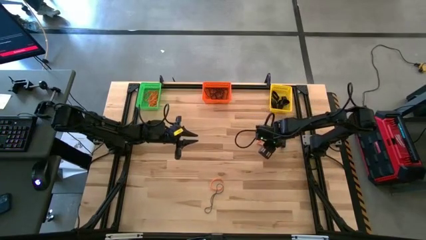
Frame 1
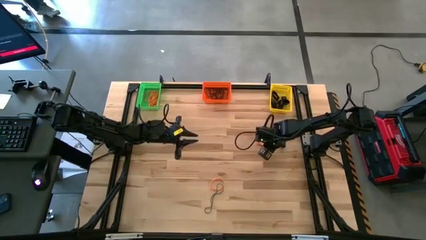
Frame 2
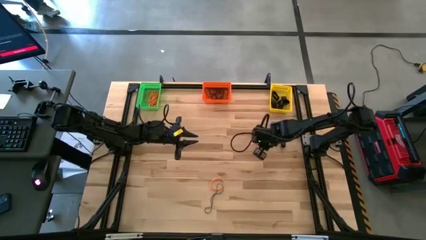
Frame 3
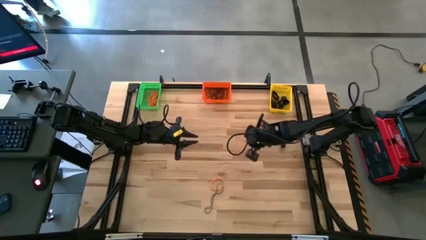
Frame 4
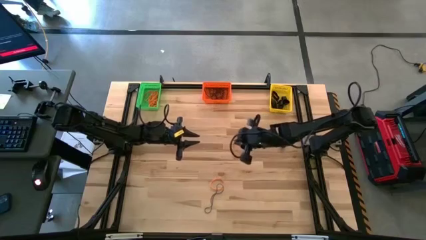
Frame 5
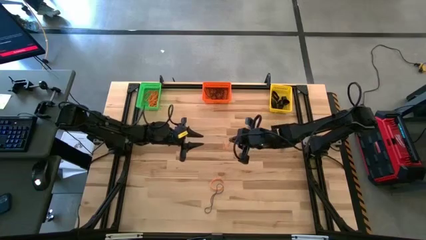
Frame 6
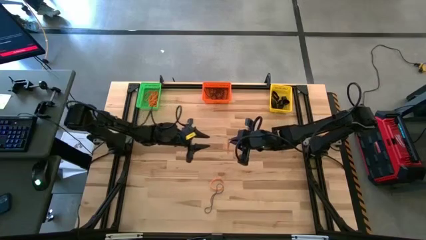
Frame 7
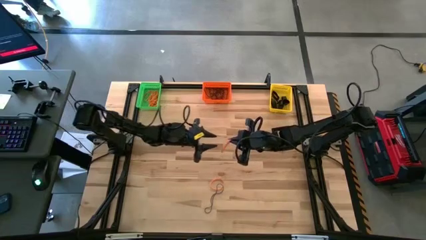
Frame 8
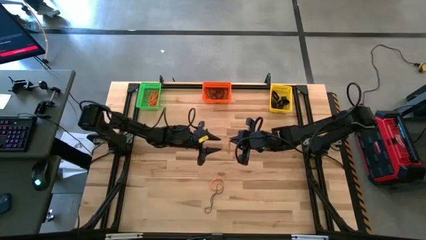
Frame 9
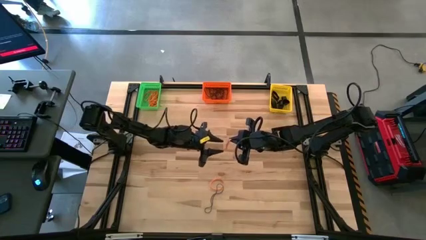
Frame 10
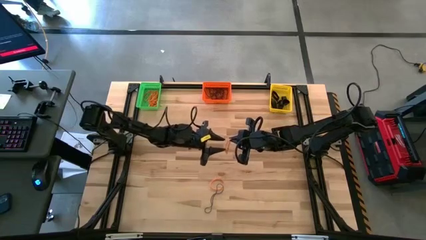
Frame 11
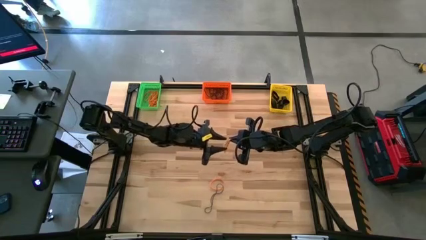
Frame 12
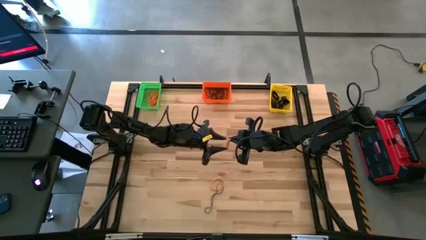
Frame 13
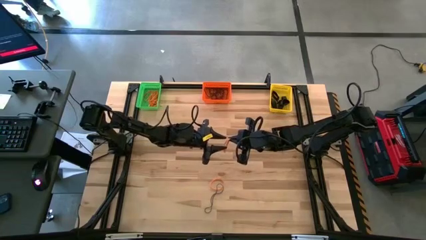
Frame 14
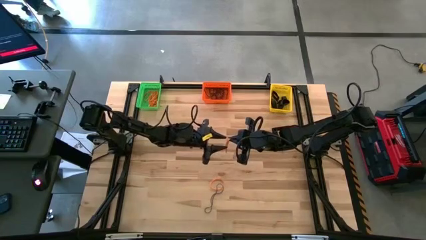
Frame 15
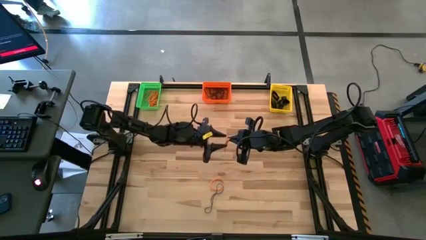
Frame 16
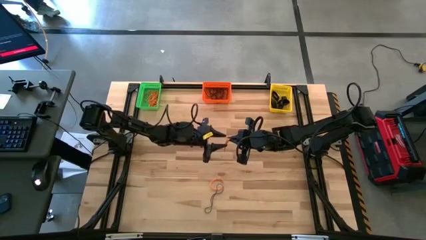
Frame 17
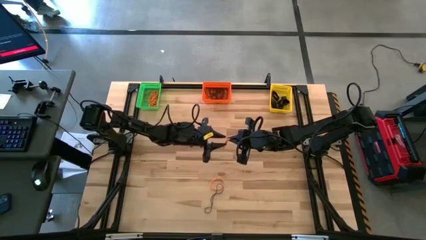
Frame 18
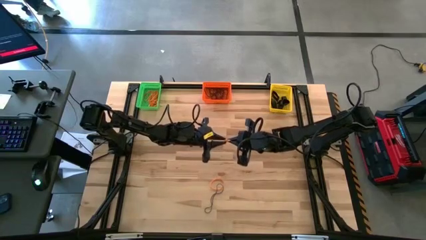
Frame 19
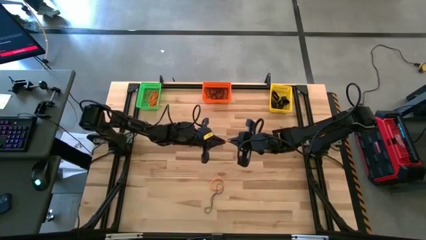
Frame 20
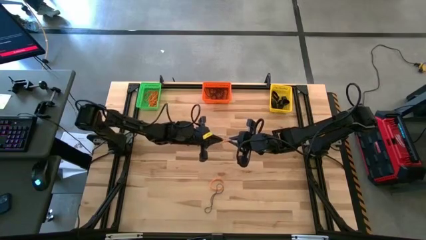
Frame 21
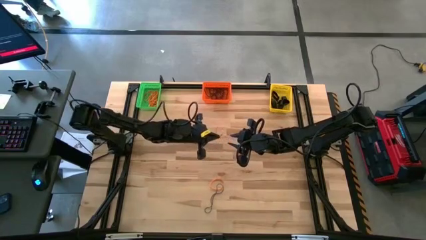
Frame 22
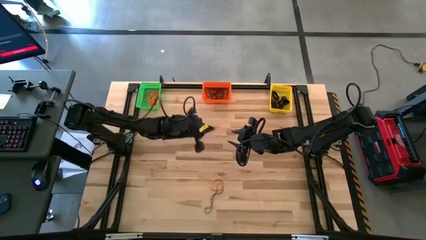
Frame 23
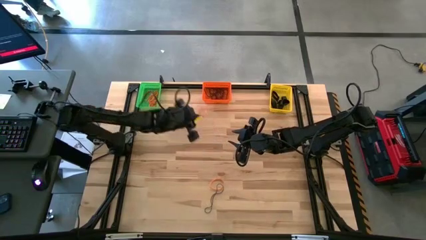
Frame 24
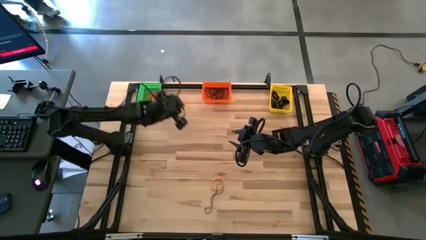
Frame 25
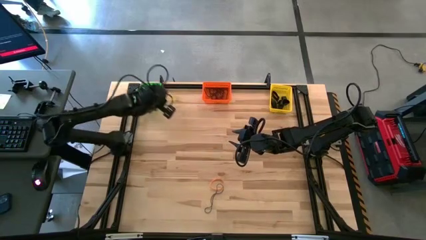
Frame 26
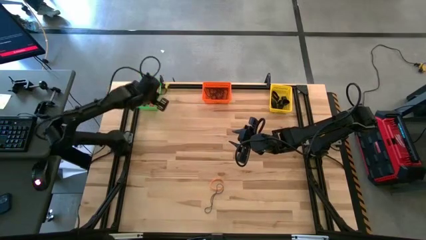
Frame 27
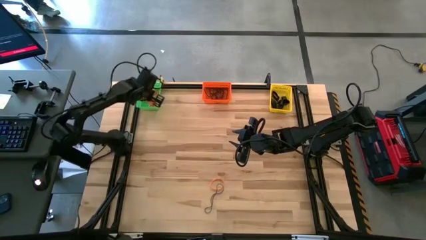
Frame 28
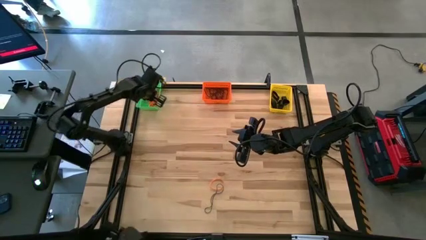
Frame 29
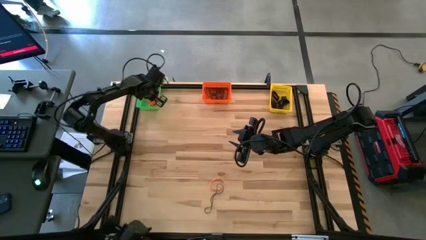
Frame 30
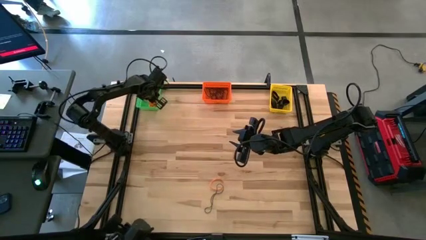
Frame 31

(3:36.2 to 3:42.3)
Task: Sort rubber bands into baskets
Put the top orange rubber band into the green bin

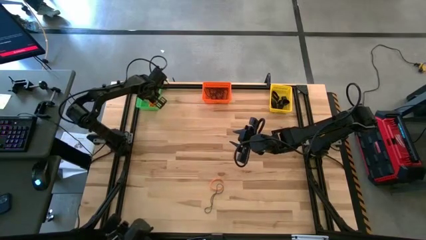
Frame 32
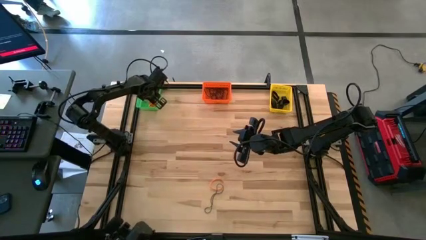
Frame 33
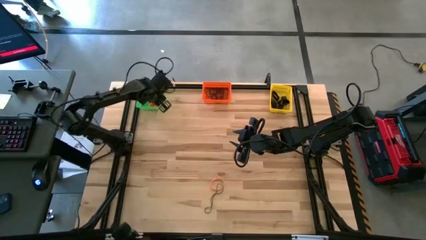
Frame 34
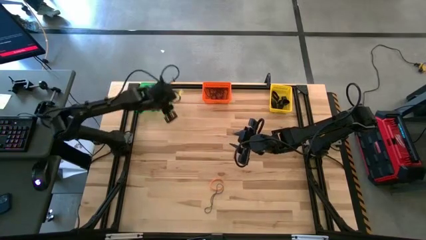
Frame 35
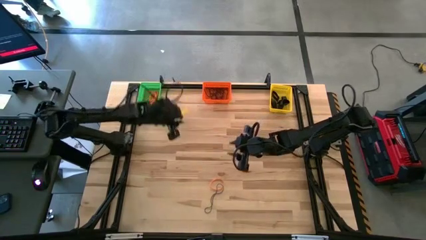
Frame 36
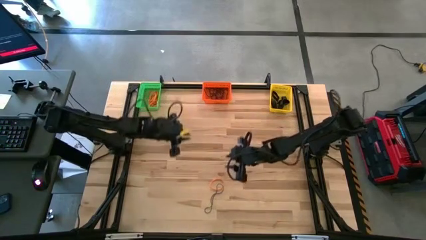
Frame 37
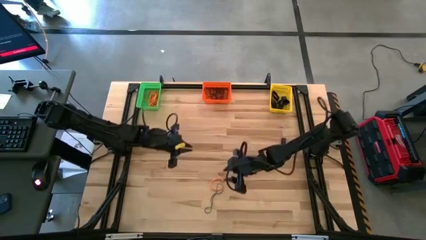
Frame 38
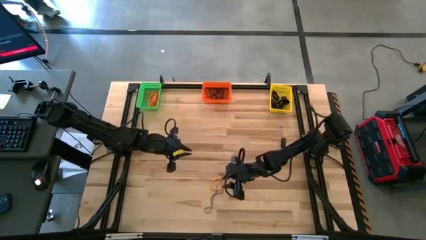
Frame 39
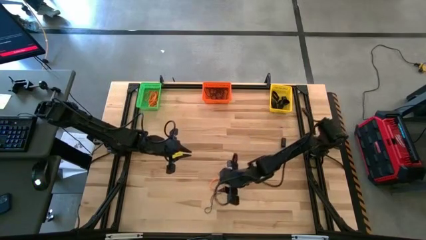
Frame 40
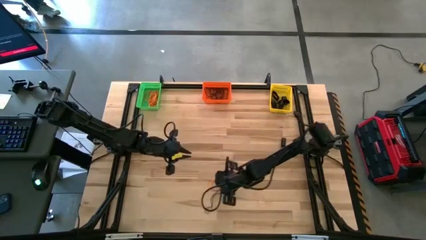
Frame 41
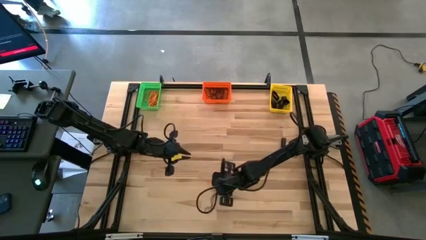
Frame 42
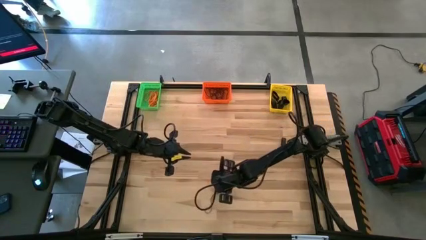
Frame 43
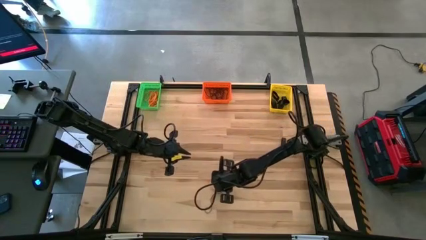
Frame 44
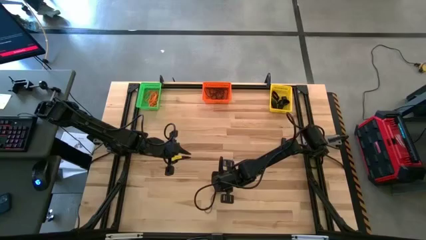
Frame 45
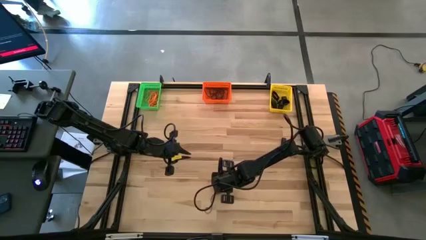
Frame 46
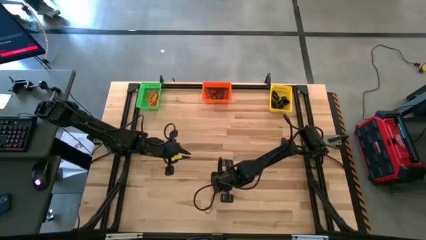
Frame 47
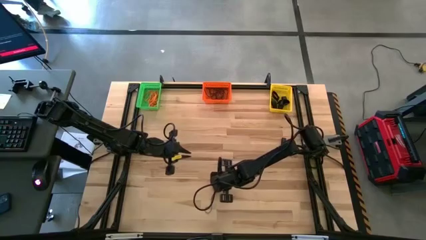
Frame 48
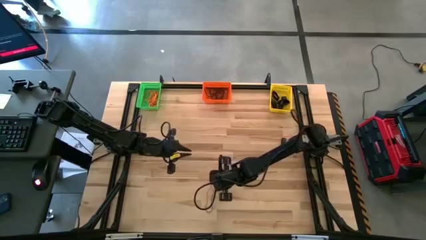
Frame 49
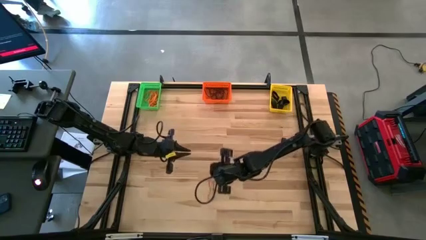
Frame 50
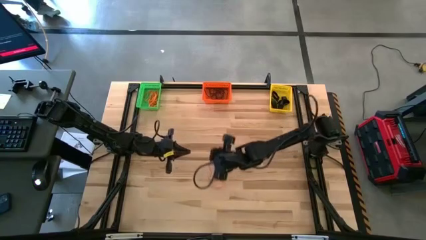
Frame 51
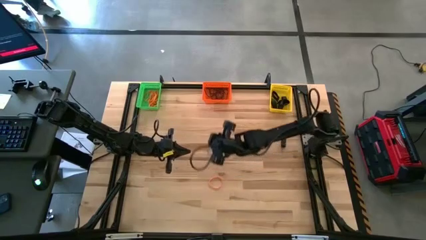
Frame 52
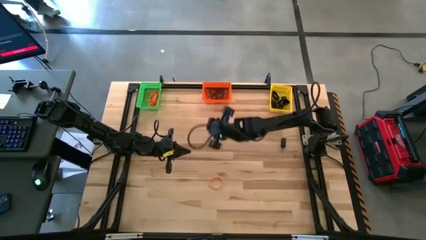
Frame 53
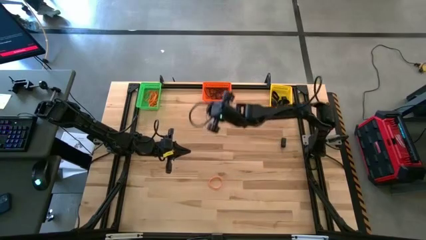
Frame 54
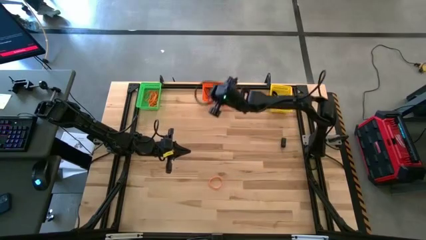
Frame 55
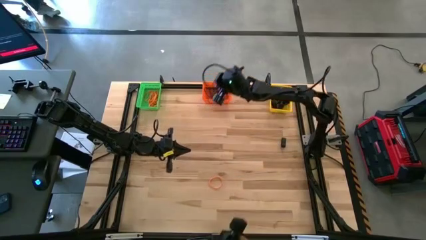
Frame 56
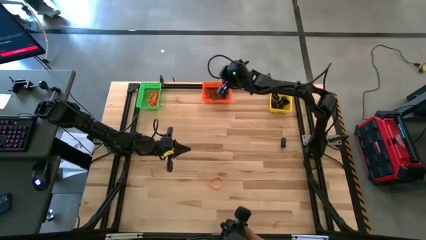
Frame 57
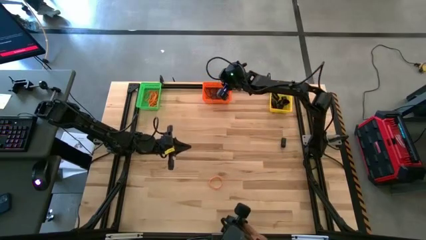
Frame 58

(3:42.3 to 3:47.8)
Put the blue rubber band into the orange bin

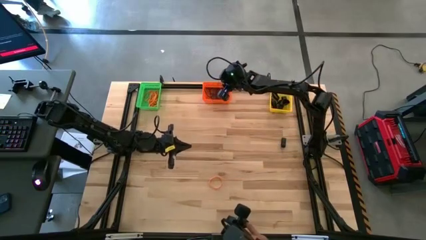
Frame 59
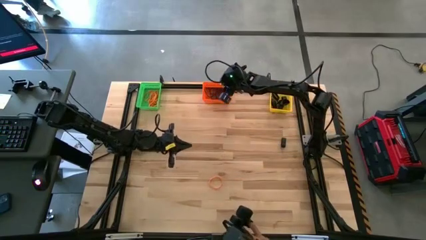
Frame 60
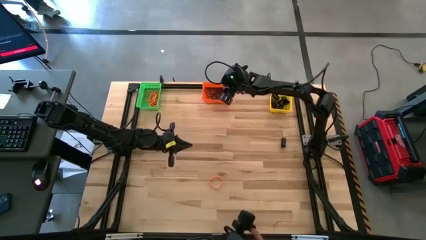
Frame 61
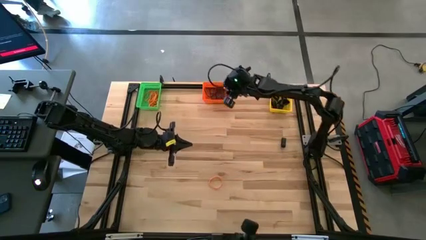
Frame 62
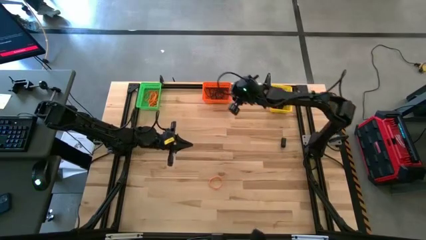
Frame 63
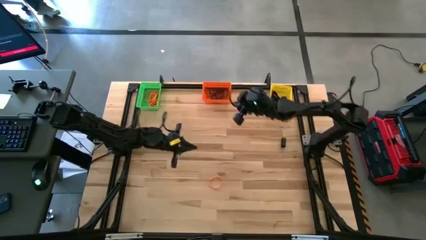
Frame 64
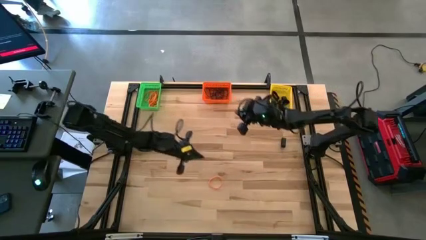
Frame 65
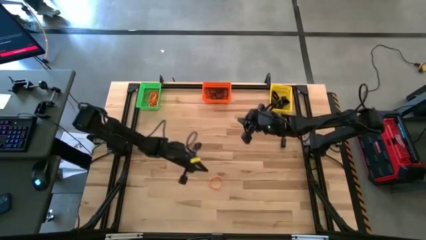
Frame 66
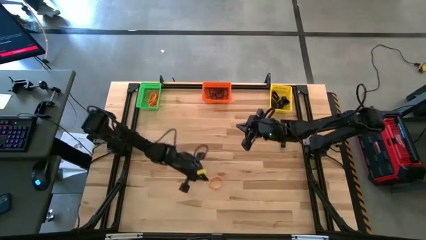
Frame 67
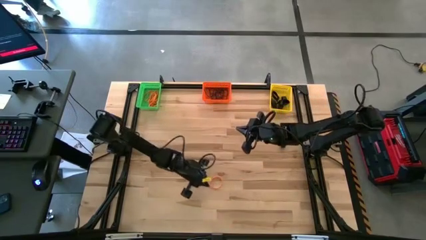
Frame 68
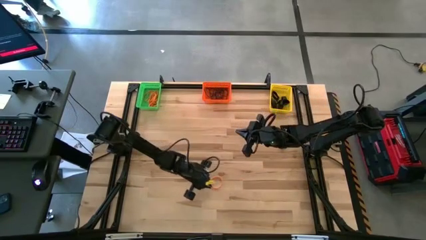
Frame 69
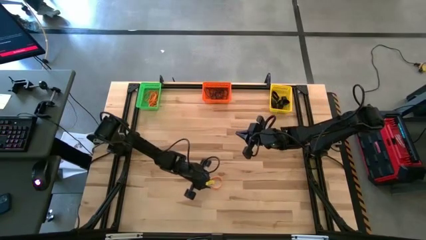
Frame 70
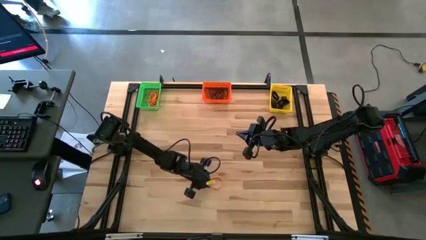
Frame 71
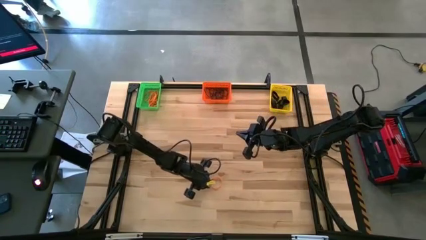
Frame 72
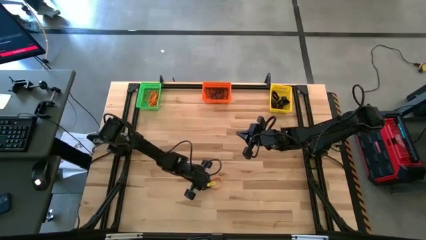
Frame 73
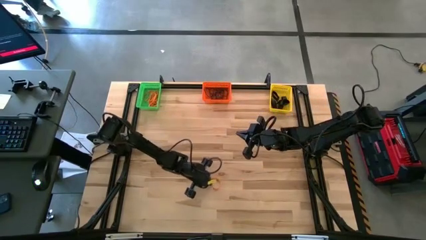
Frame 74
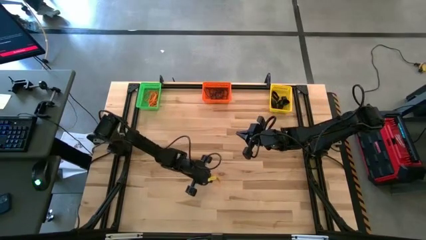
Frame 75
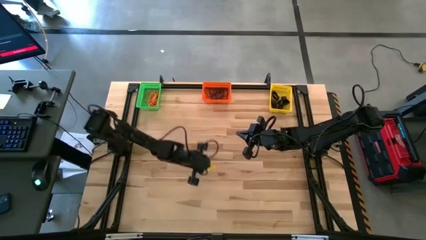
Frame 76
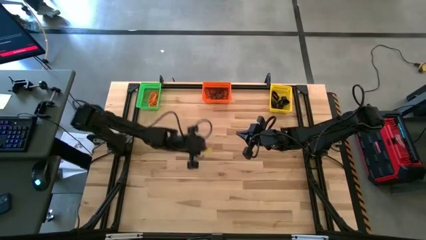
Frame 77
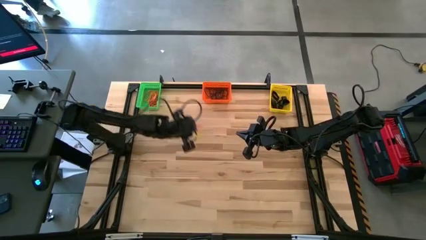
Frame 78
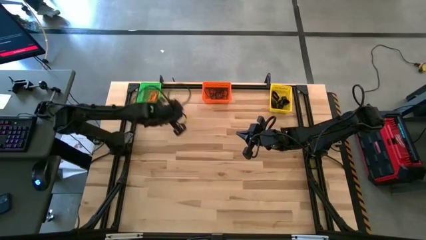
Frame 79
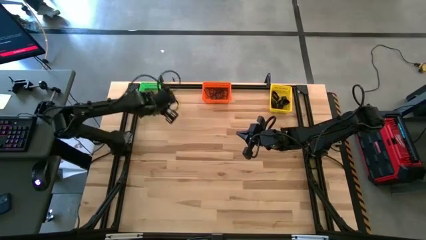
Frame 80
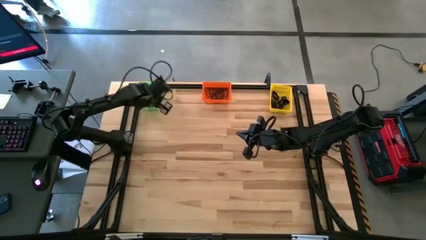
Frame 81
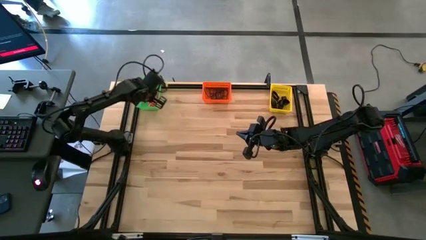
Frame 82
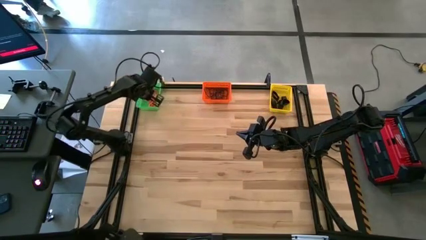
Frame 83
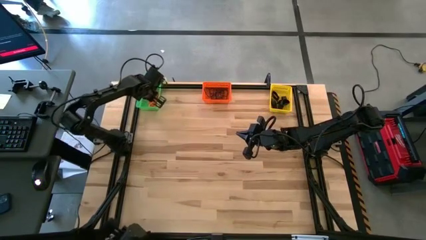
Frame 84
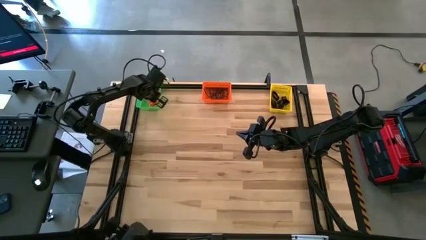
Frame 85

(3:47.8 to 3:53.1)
Put the orange rubber band into the green bin
